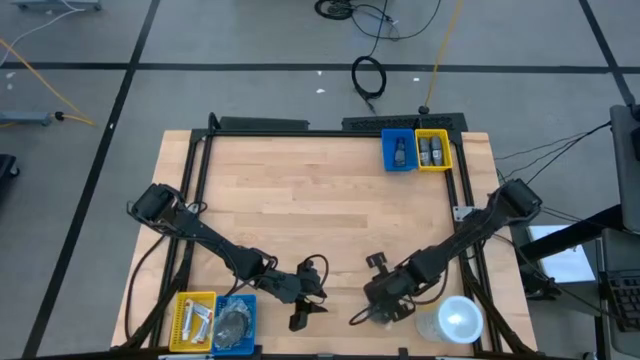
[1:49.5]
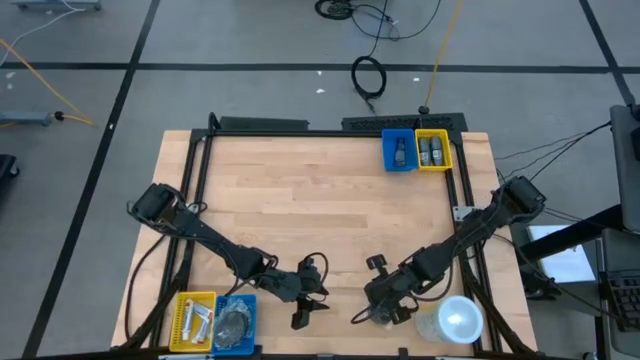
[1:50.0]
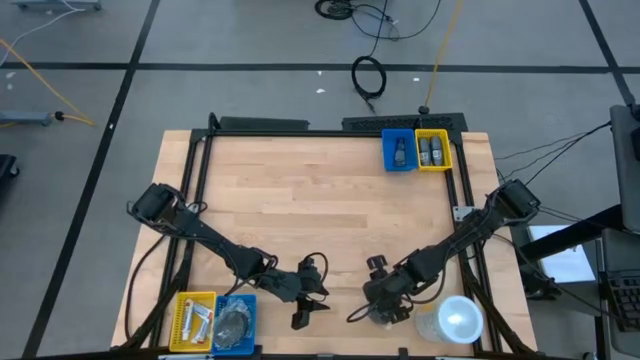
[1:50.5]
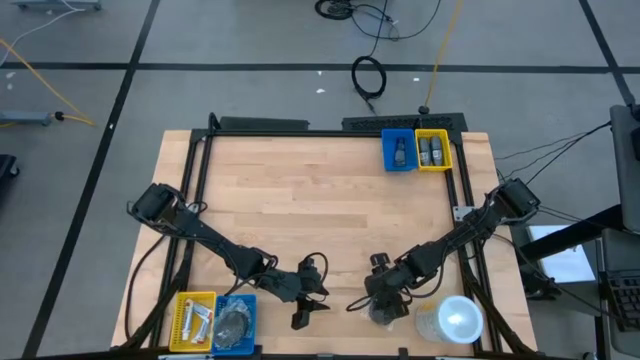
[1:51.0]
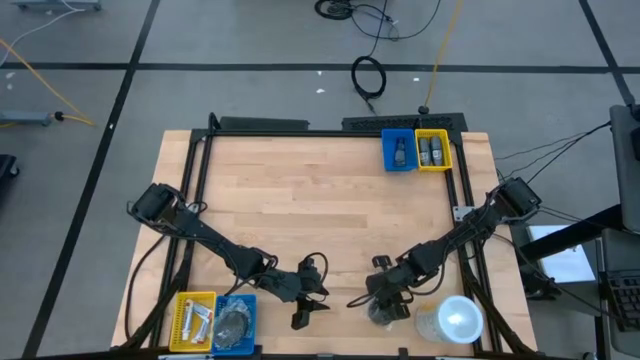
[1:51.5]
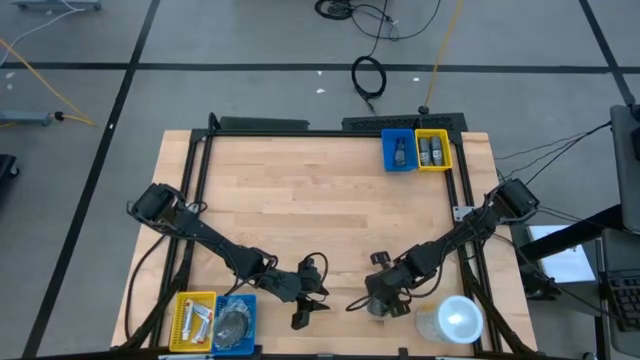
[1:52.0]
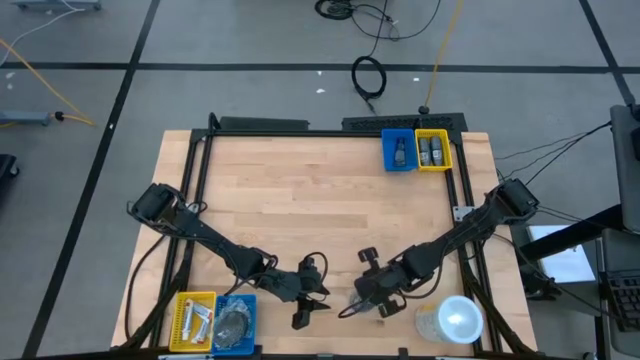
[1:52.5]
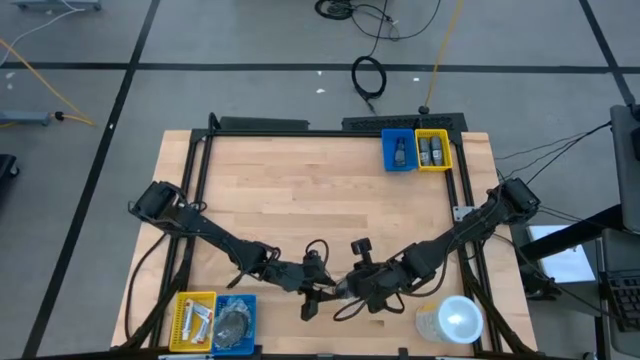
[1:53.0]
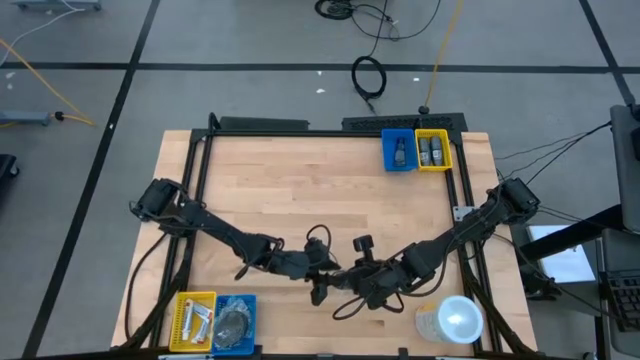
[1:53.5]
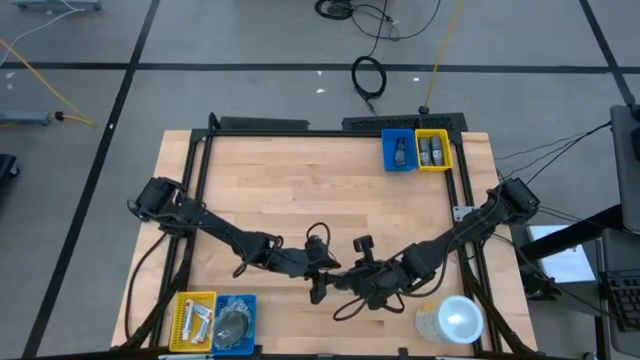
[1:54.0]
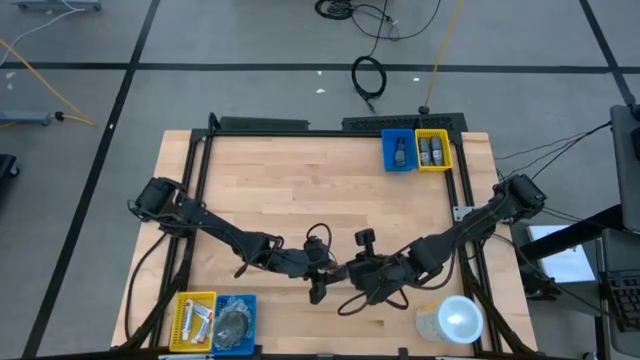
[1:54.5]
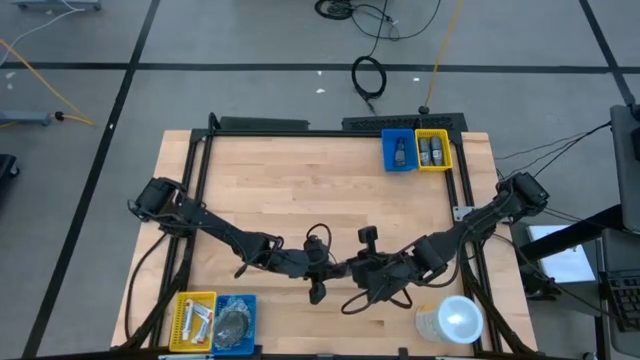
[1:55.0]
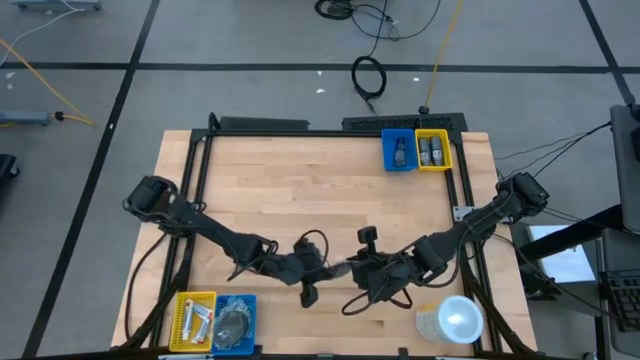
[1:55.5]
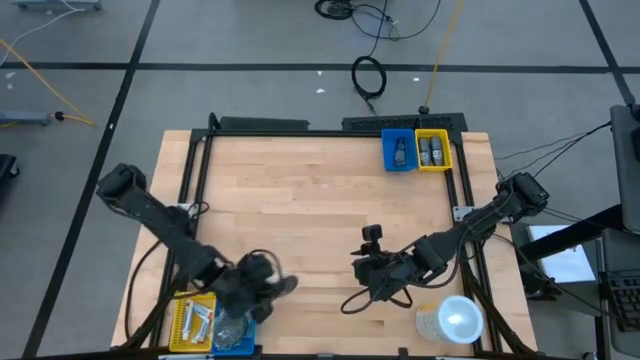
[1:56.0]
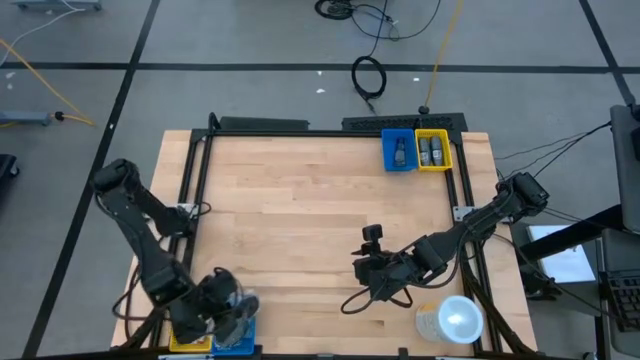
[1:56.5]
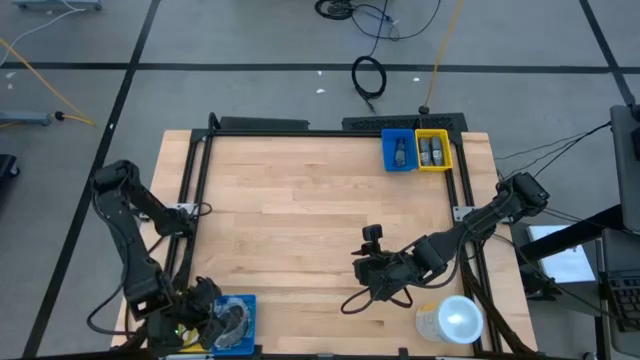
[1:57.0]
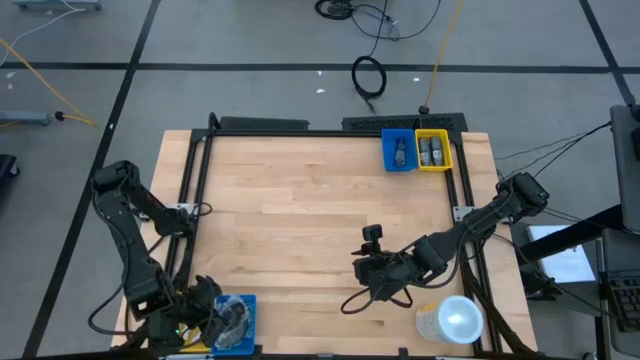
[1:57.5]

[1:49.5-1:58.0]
Task: Pick & Place Travel size toiletries
Put the black hairbrush into the bottom blue bin

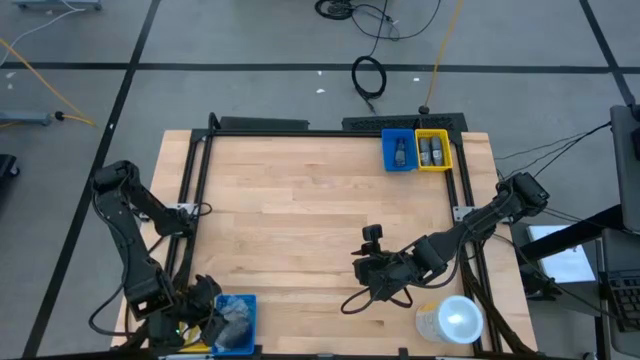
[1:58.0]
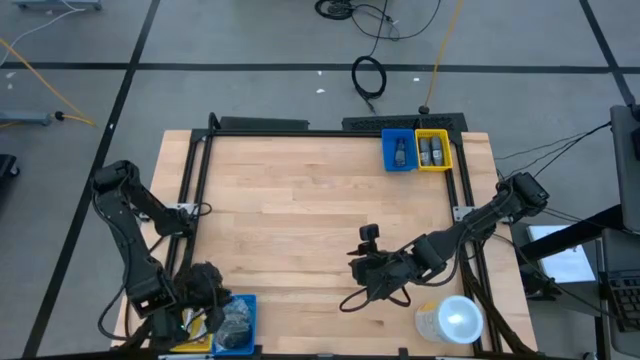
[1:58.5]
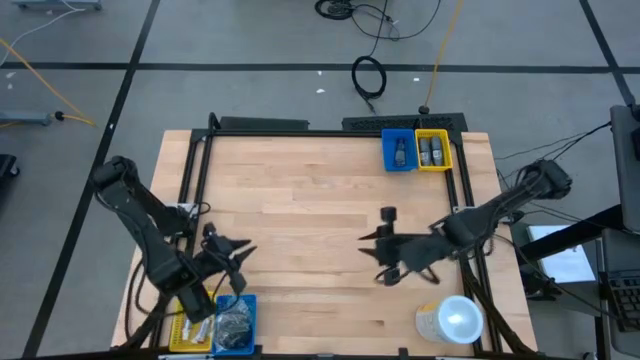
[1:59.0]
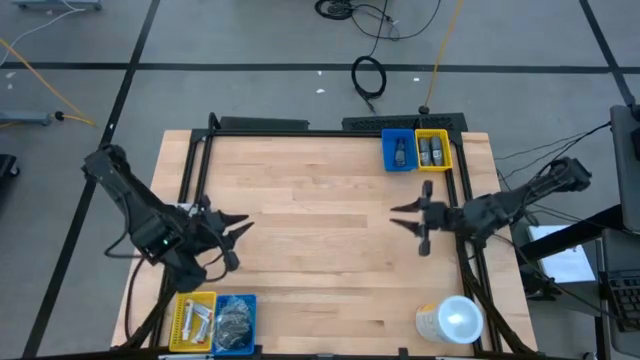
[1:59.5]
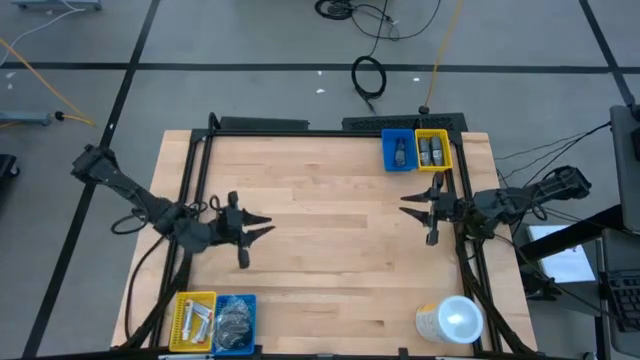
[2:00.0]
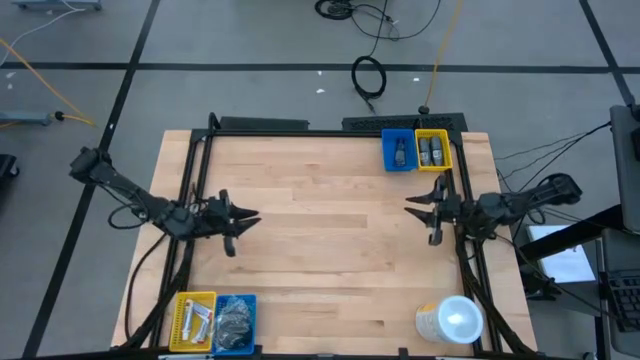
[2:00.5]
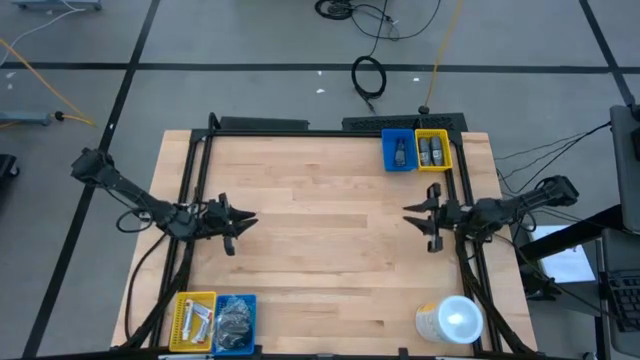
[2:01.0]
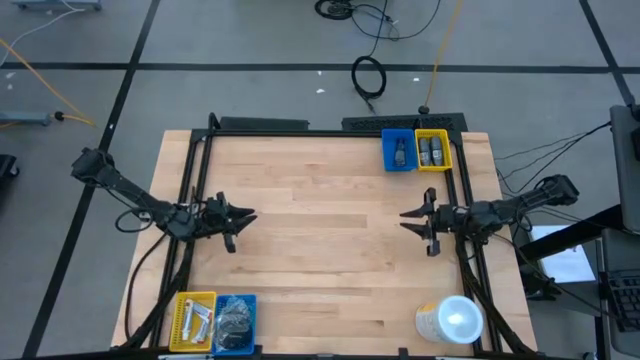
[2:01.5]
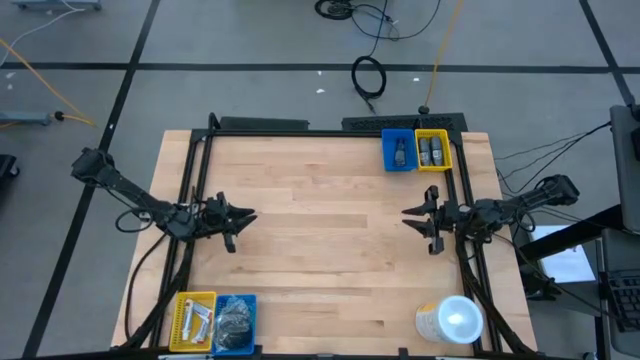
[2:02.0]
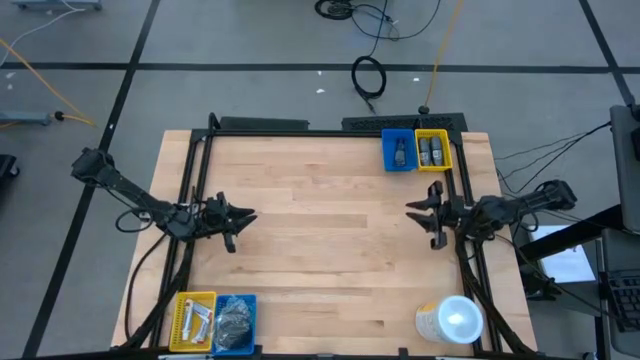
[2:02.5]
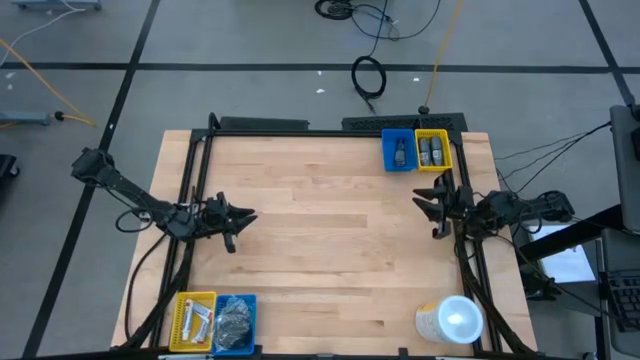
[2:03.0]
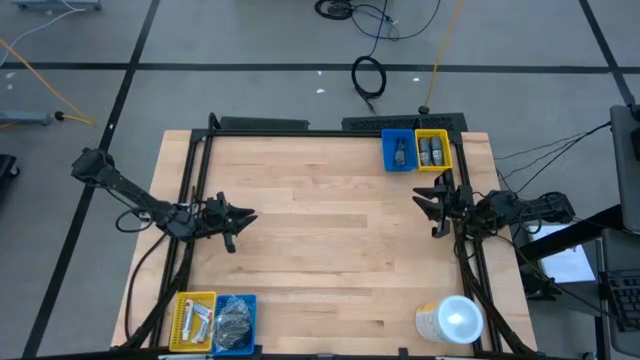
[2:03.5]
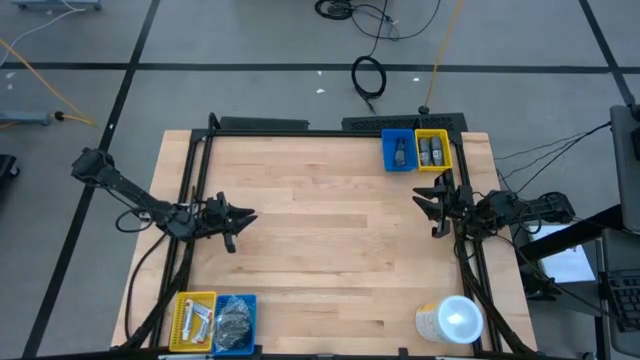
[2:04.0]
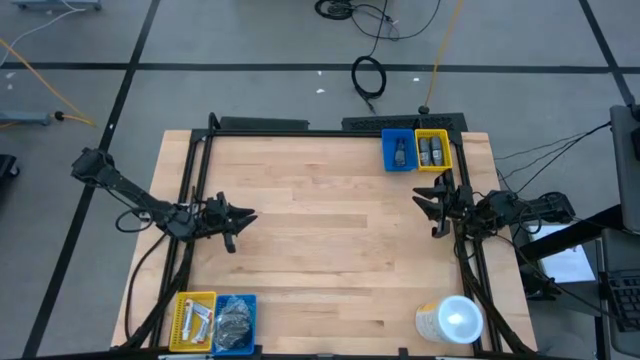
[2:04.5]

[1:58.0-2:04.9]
Return to Home Position

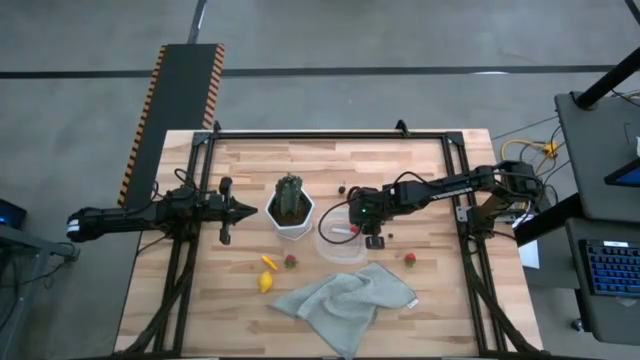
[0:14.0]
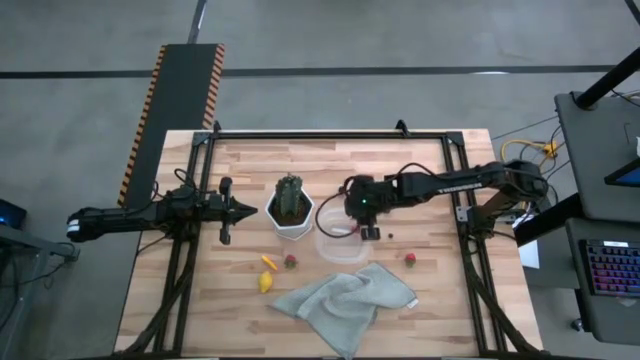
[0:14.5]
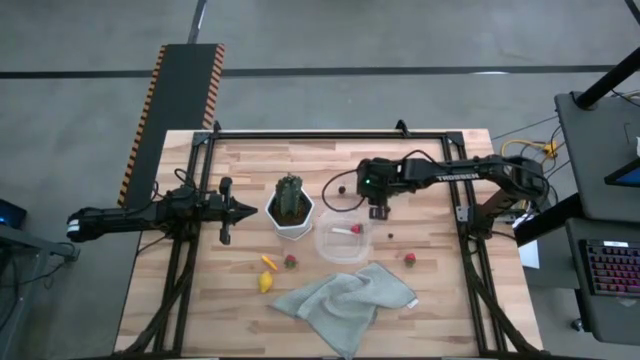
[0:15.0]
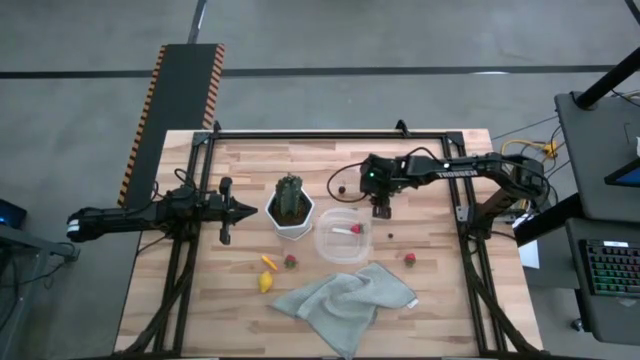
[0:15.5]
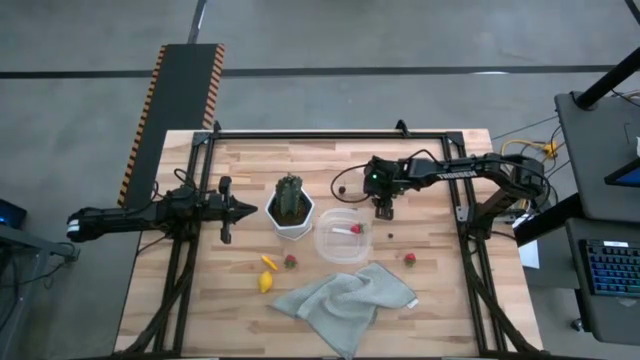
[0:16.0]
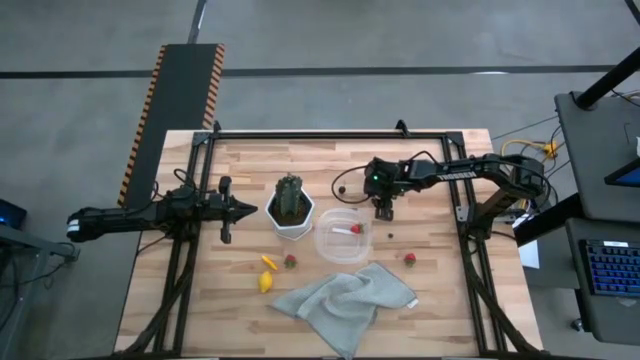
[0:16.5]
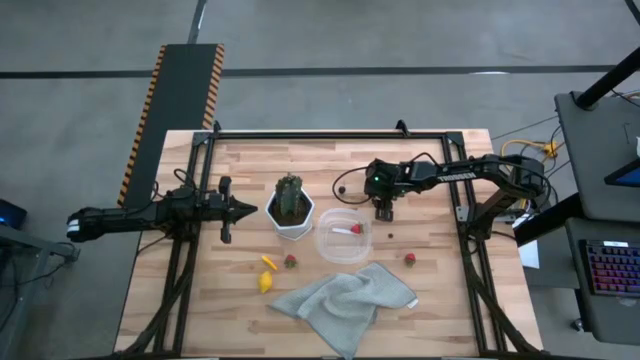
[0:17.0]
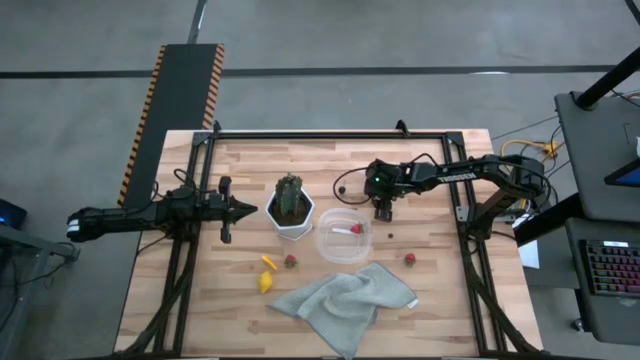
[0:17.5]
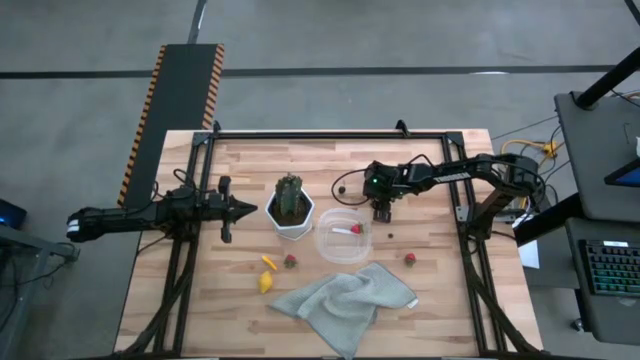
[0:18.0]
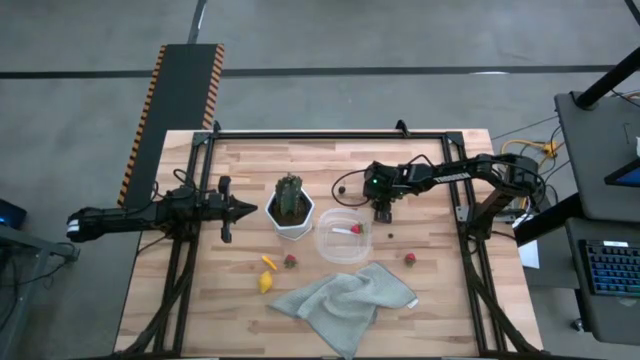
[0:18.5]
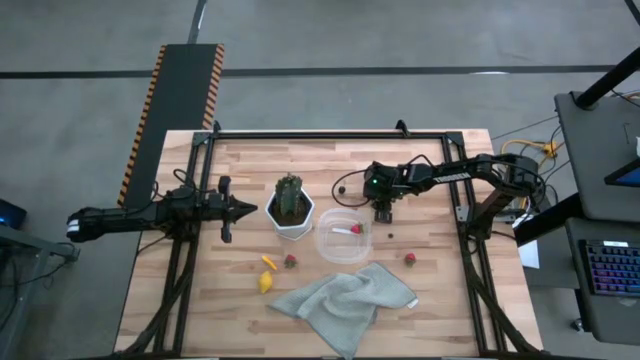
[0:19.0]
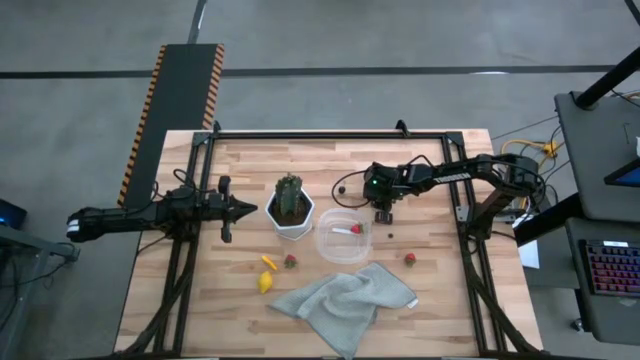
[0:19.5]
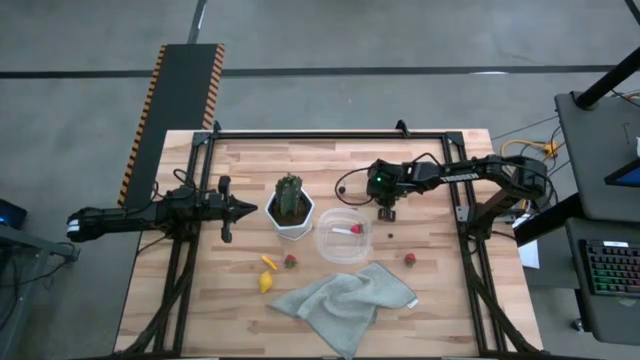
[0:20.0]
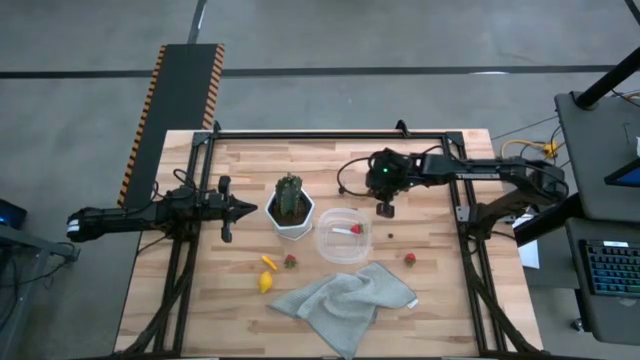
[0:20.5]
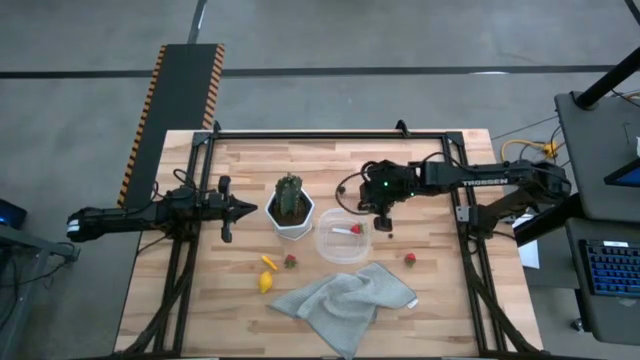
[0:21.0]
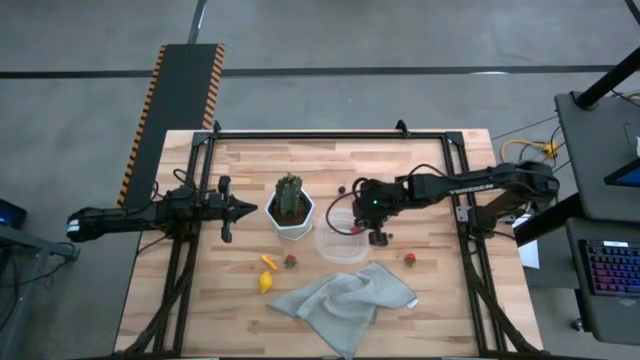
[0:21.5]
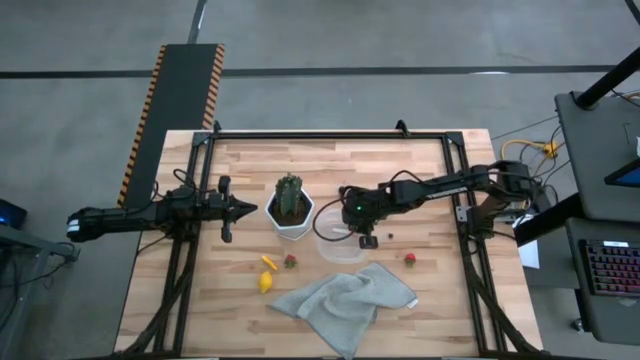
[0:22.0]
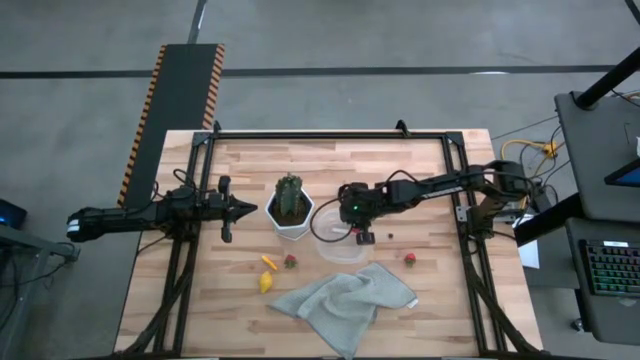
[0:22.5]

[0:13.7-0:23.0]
Task: Pick and placing Produce into tupperware
Put the top blueberry into the transparent bin
